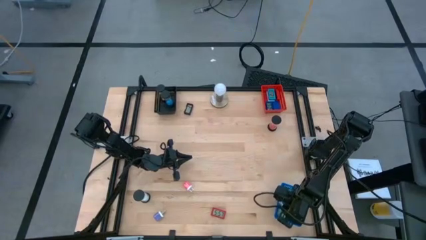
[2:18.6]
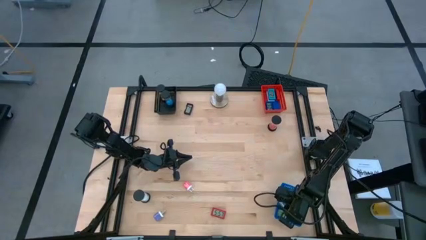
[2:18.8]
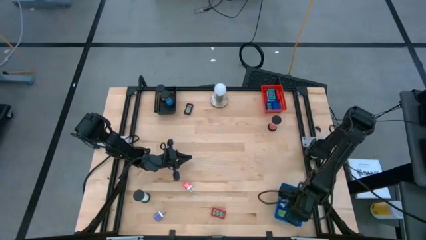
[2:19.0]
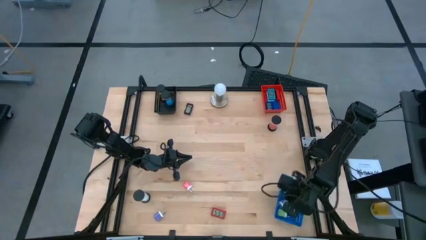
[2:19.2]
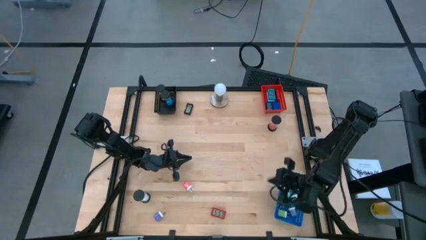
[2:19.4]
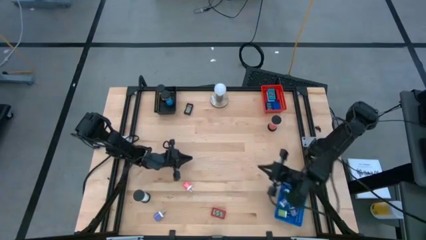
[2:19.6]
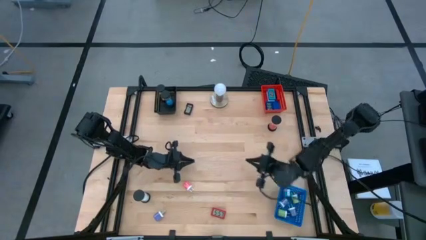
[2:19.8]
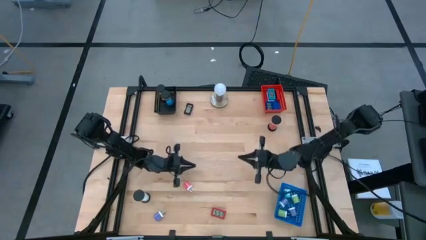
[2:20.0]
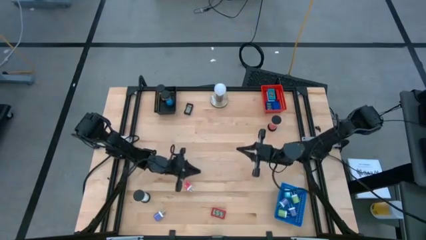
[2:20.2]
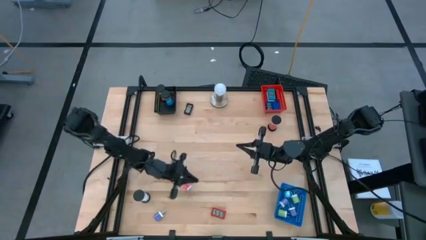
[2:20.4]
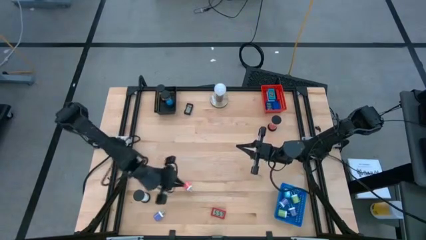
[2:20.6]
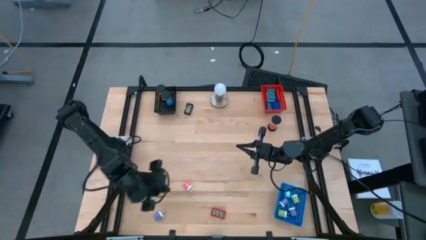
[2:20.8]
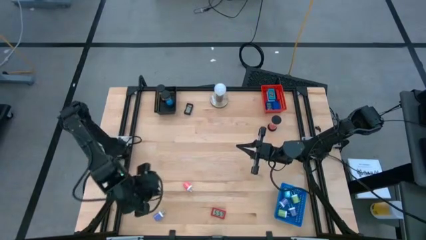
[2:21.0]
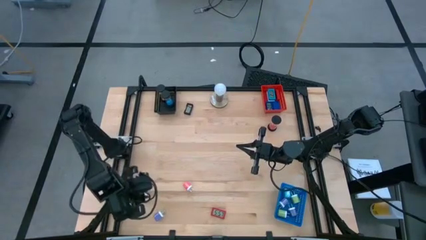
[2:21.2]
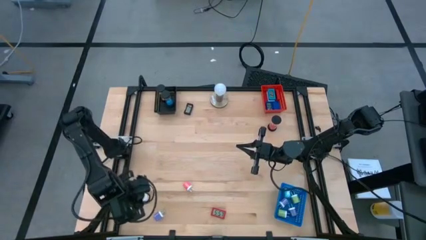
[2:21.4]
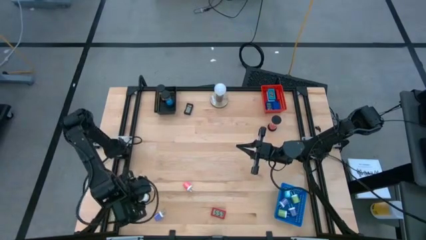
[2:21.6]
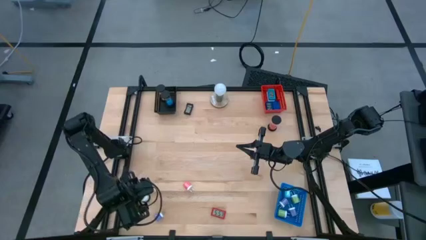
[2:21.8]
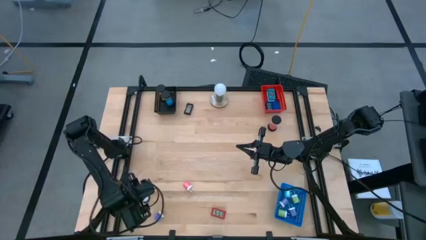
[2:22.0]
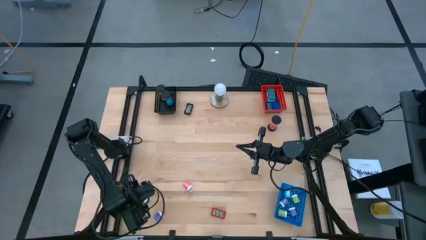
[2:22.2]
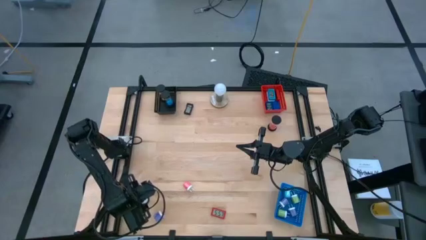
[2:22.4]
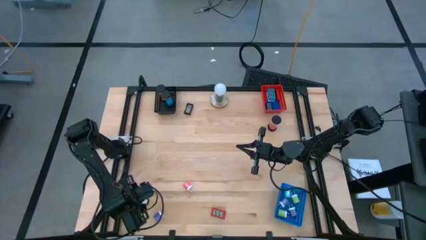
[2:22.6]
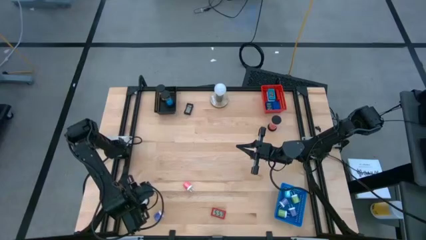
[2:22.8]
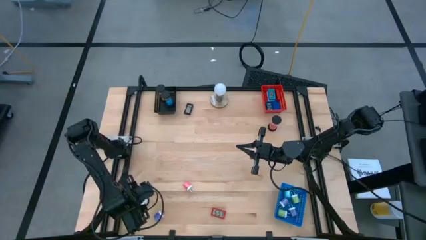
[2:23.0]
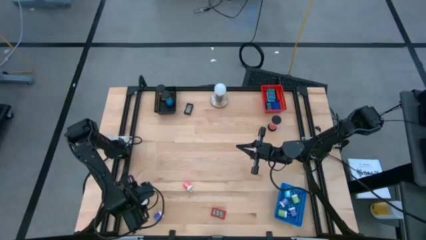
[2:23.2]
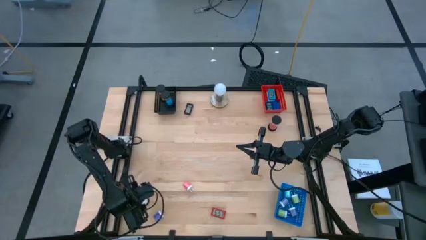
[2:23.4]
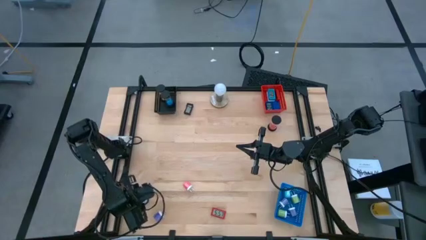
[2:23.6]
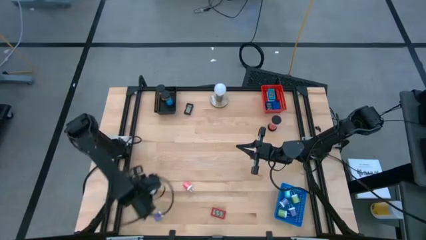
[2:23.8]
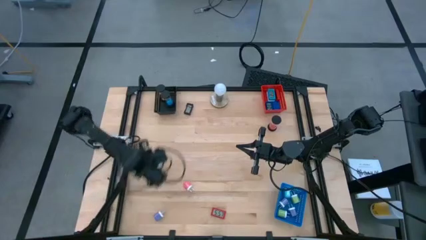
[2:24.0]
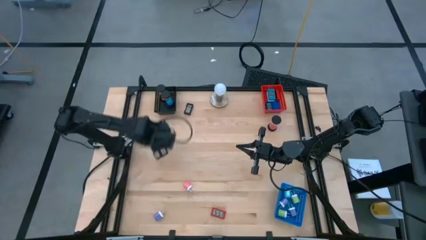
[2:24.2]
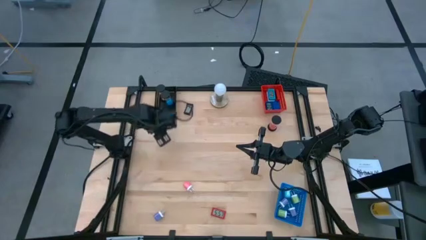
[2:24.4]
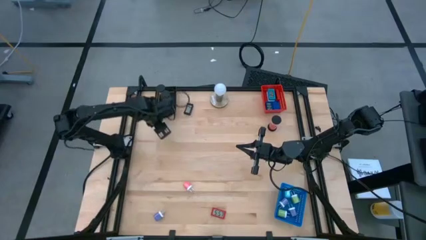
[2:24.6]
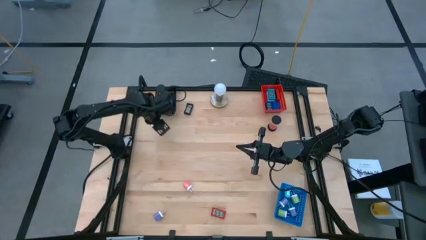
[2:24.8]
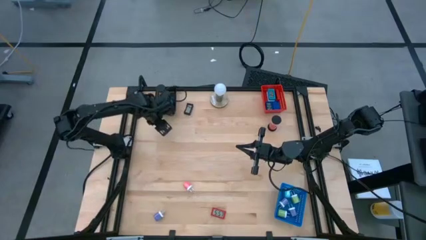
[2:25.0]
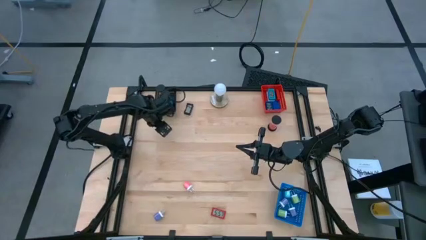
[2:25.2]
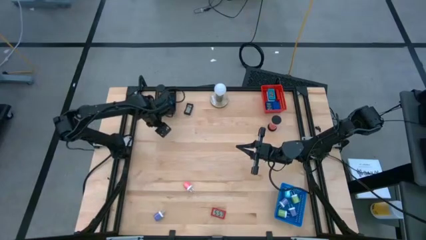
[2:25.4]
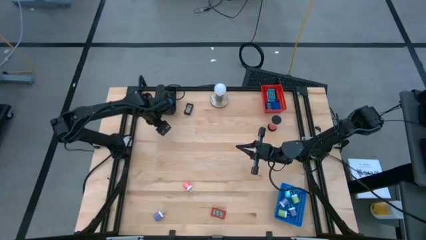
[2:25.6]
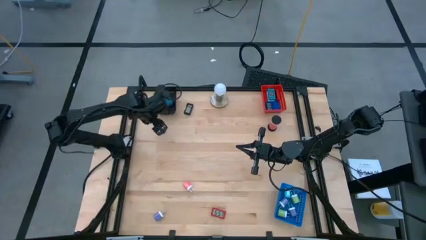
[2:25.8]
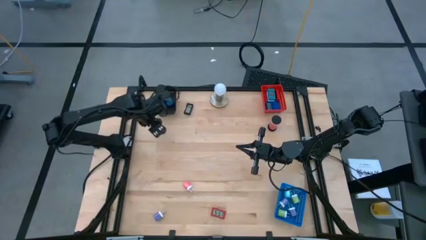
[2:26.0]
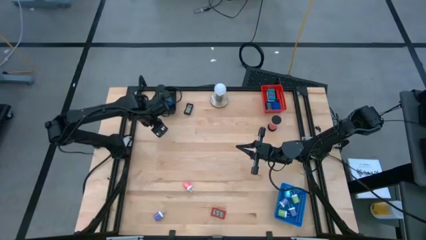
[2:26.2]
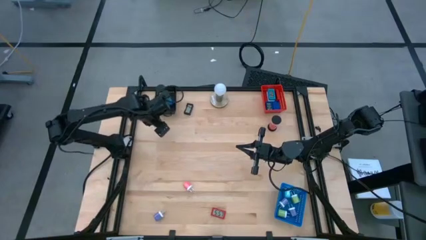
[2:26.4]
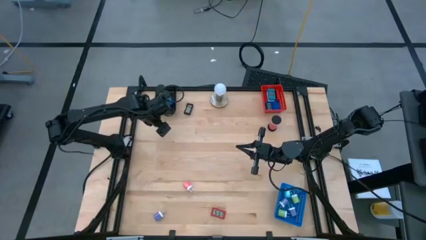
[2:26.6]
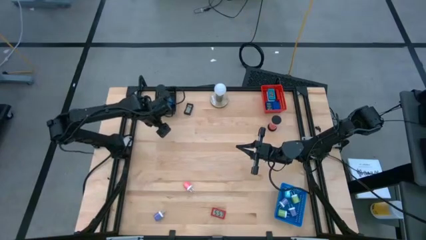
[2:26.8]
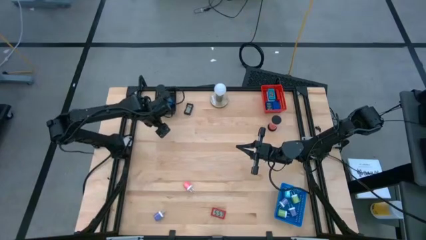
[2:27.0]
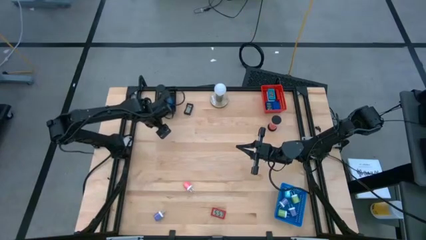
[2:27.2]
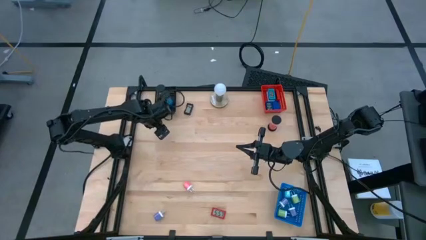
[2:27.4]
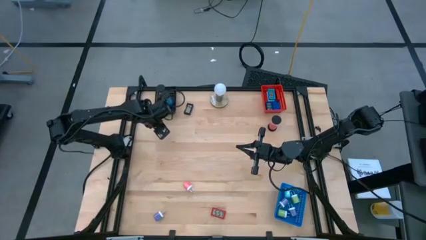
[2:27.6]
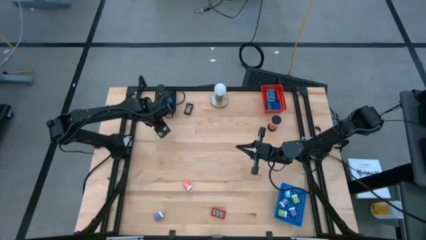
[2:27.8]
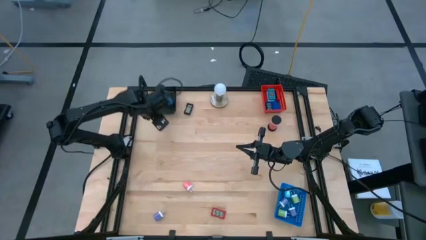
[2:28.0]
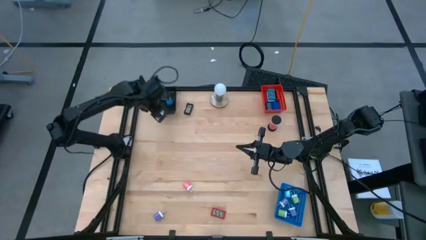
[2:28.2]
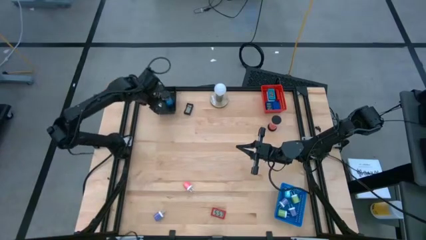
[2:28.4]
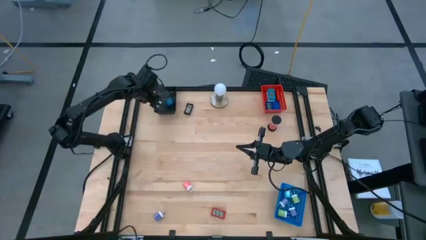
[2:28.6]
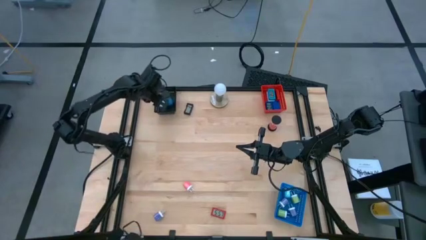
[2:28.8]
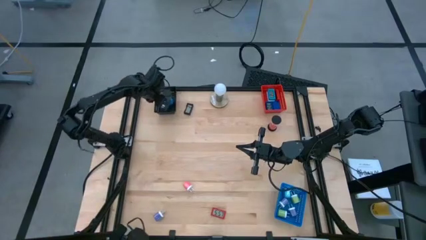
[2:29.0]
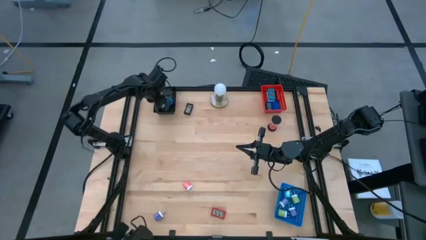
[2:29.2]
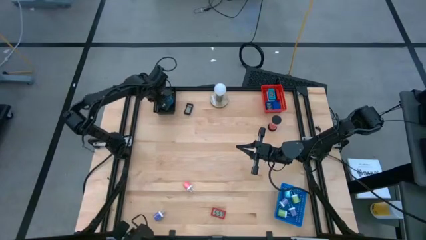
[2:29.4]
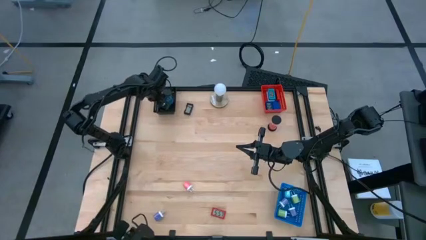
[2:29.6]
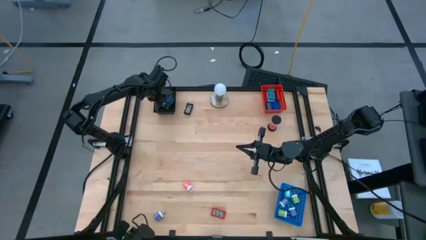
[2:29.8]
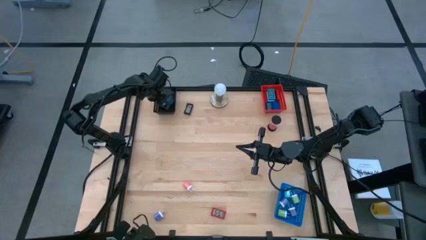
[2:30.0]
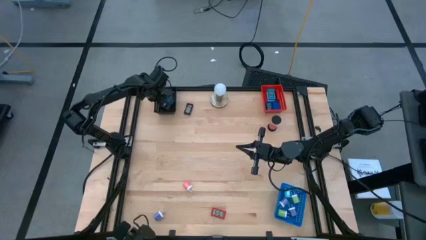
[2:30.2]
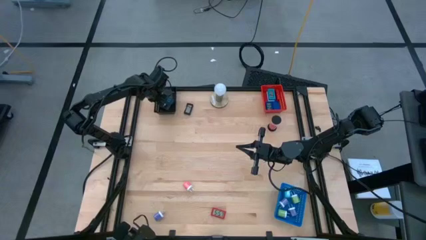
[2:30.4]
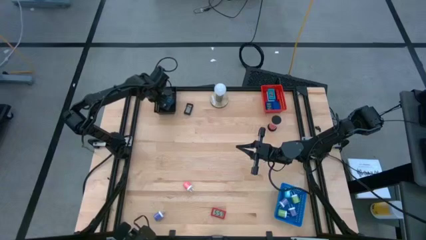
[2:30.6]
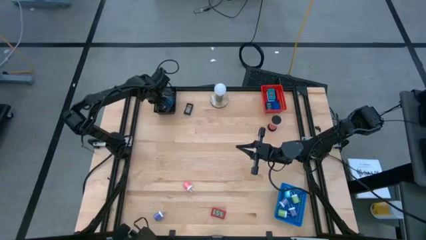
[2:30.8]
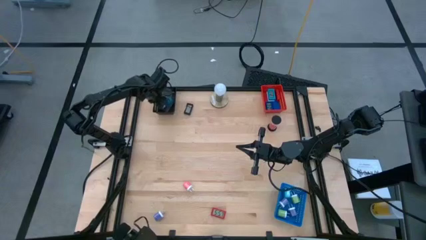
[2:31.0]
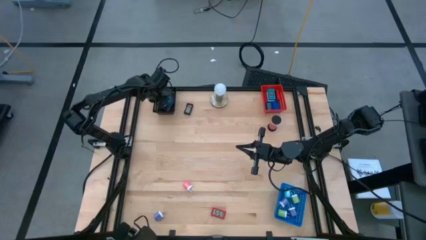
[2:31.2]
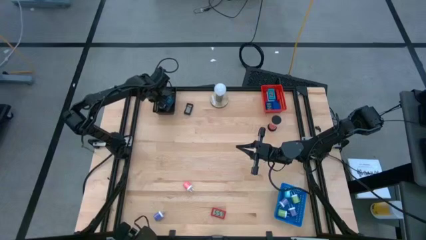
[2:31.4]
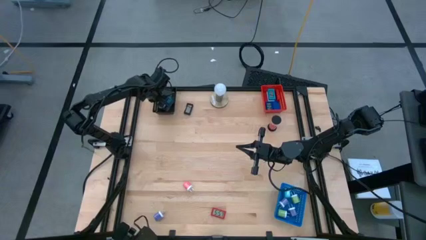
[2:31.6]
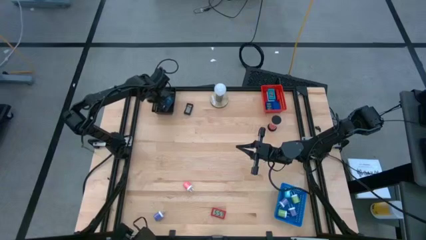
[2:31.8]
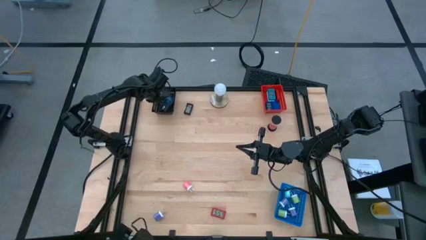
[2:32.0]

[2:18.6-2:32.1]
Task: Pick & Place Office items
Put the white hourglass into the black bin

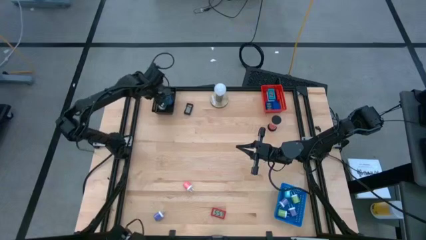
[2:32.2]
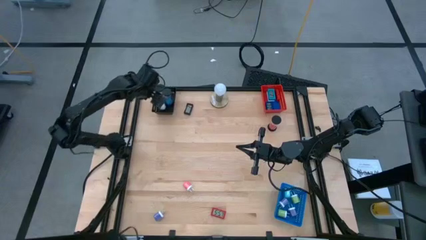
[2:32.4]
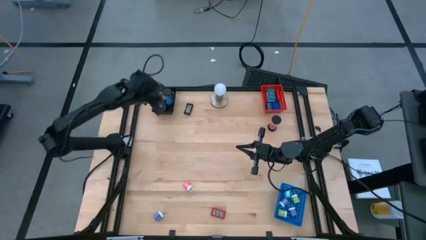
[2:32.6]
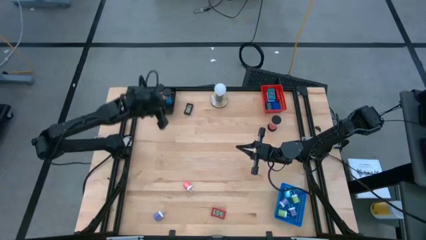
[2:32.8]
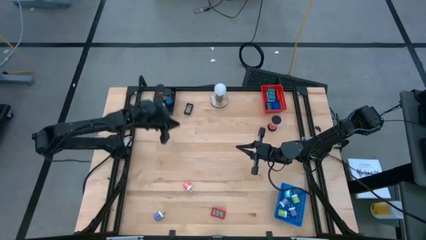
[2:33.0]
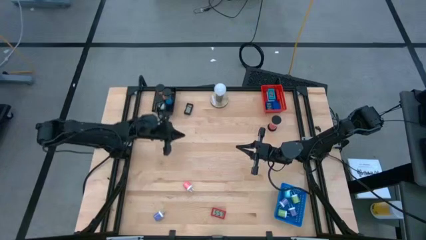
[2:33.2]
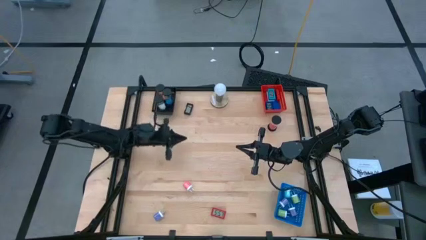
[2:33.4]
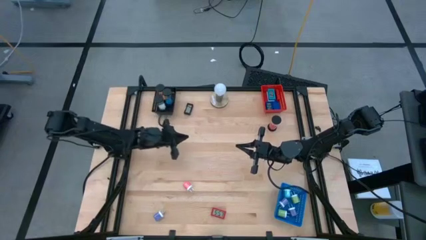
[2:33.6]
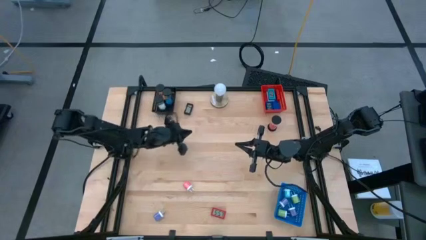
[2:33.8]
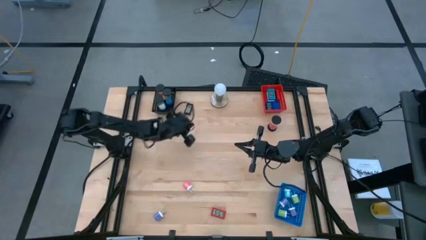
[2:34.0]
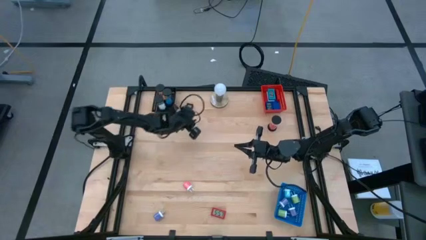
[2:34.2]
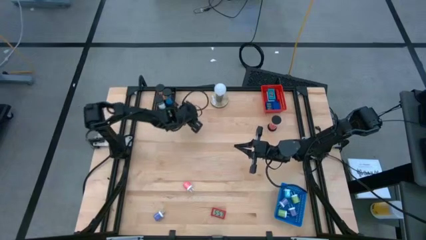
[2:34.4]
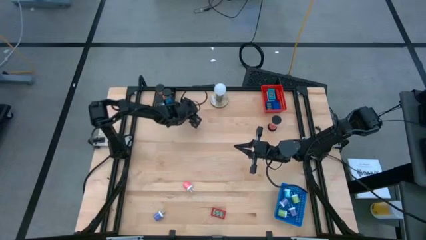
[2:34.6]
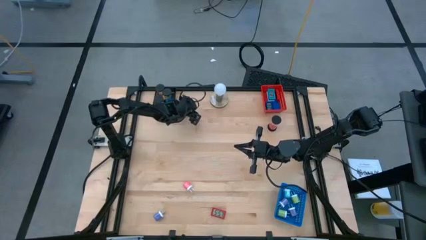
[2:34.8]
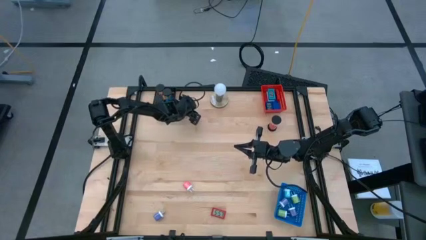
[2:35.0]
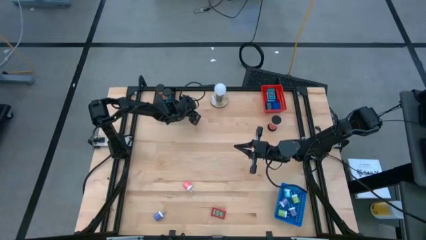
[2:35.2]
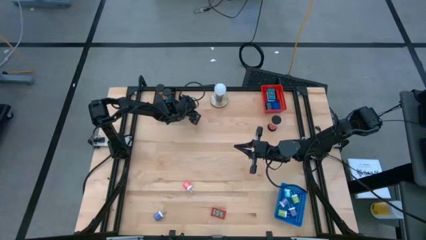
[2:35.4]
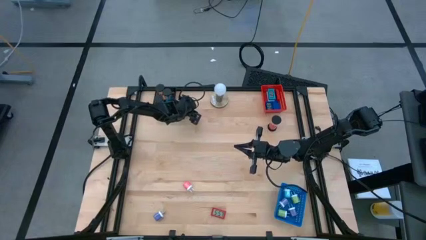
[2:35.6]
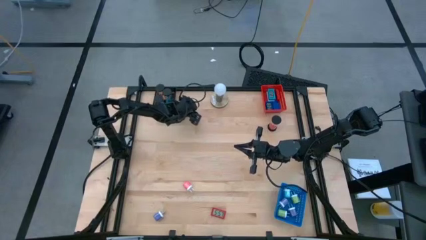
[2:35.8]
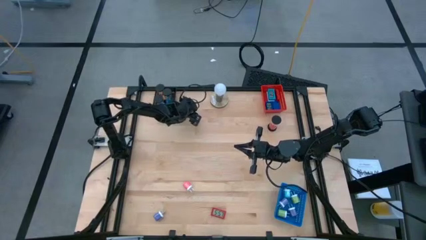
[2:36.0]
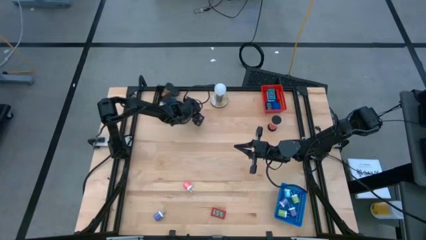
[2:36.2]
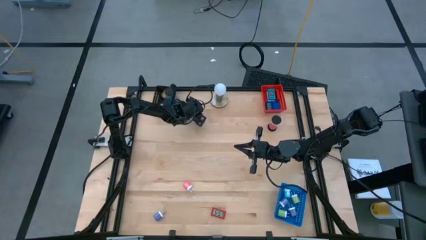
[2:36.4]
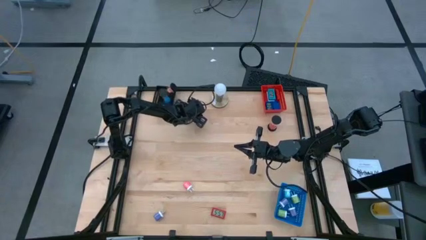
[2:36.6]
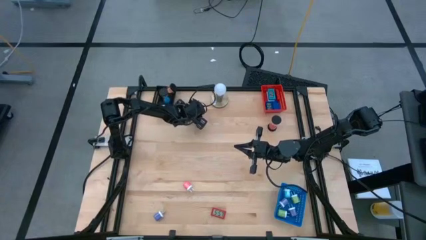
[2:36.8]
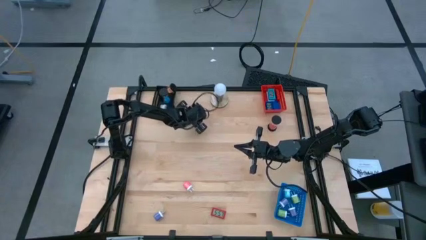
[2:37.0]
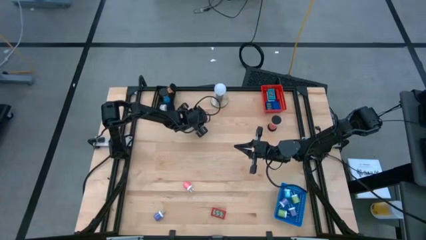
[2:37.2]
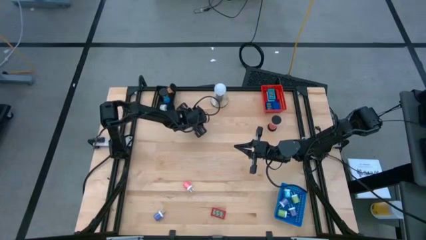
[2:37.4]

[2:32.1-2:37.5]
Adjust the black digital clock
